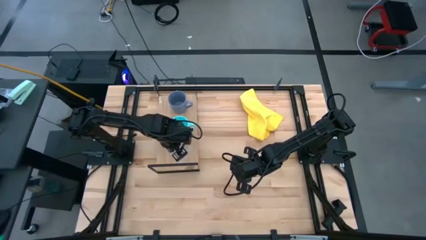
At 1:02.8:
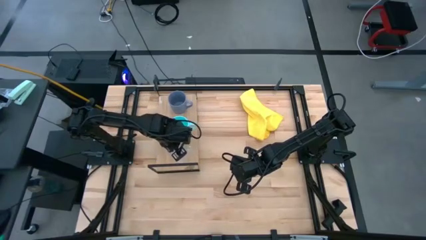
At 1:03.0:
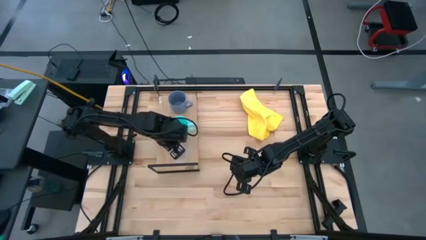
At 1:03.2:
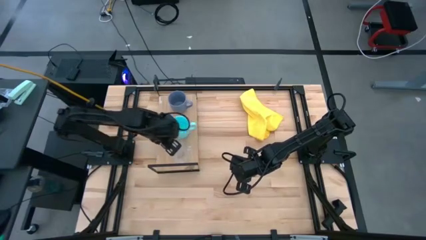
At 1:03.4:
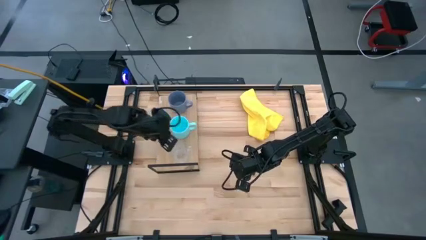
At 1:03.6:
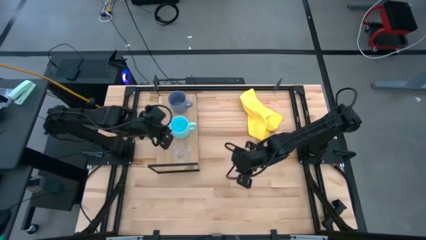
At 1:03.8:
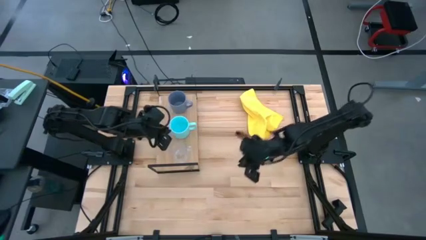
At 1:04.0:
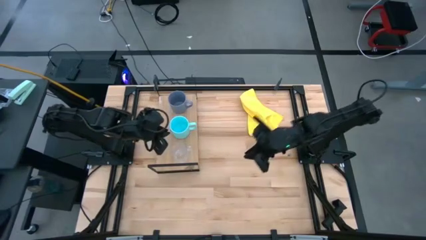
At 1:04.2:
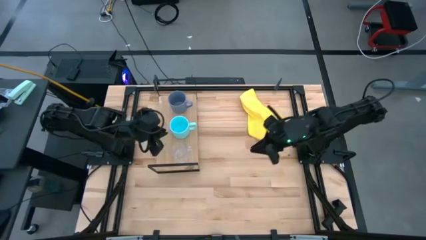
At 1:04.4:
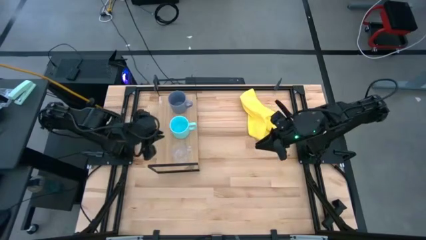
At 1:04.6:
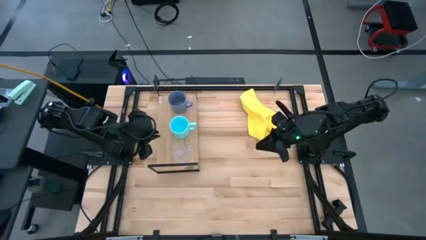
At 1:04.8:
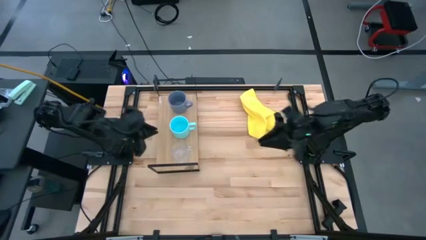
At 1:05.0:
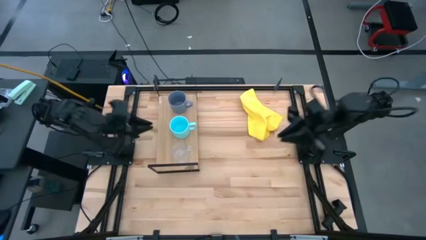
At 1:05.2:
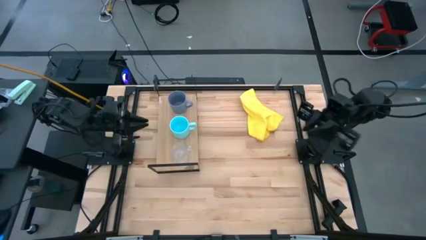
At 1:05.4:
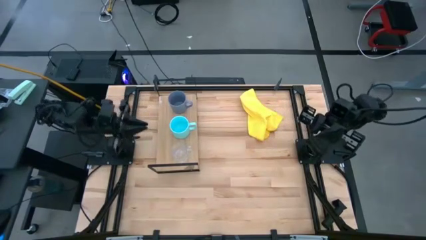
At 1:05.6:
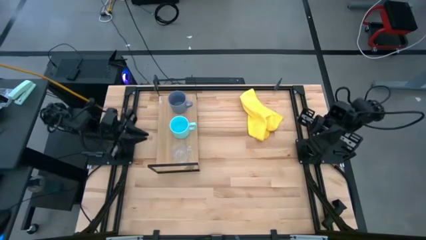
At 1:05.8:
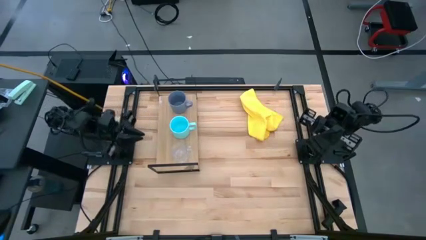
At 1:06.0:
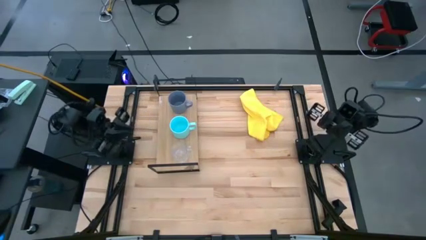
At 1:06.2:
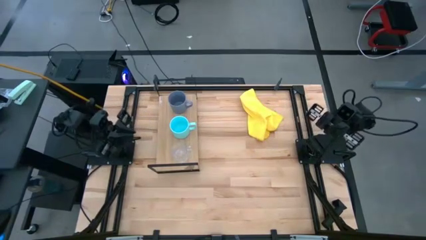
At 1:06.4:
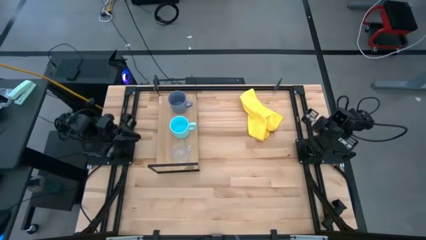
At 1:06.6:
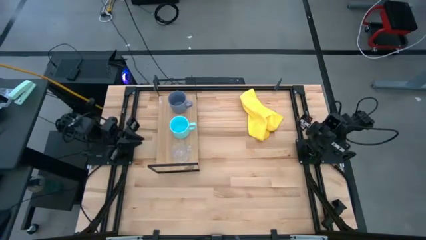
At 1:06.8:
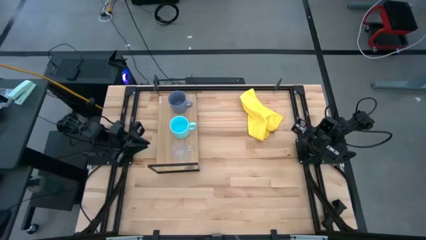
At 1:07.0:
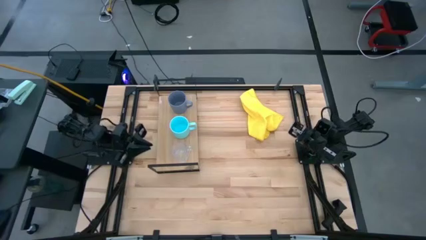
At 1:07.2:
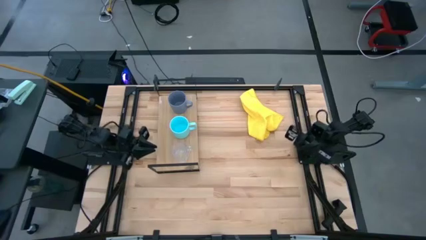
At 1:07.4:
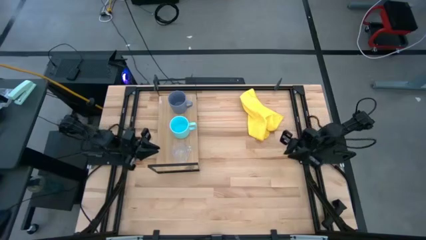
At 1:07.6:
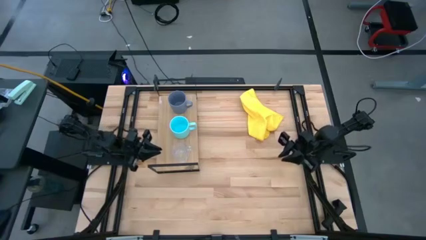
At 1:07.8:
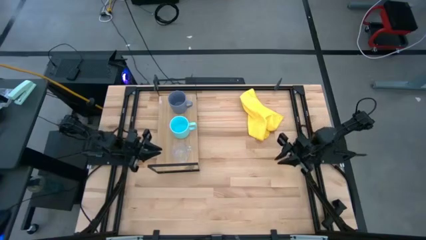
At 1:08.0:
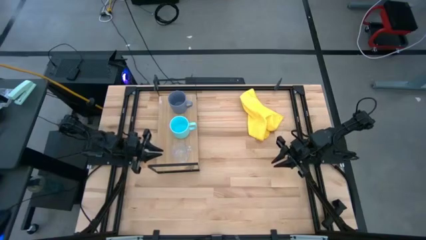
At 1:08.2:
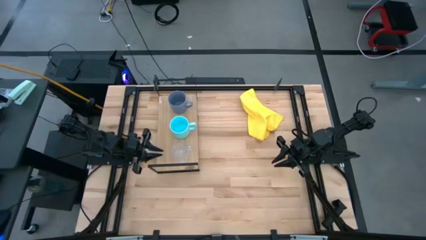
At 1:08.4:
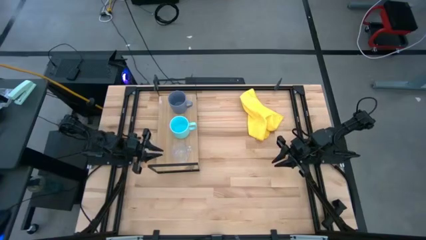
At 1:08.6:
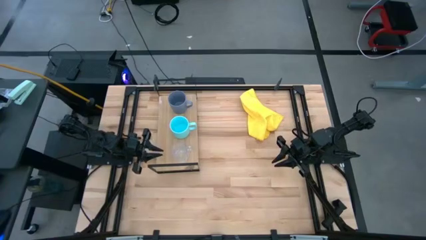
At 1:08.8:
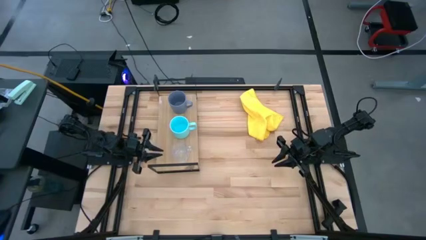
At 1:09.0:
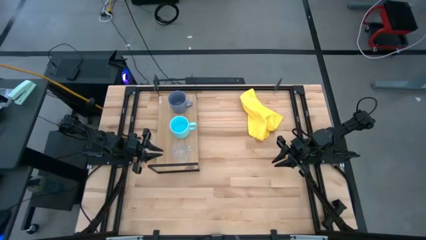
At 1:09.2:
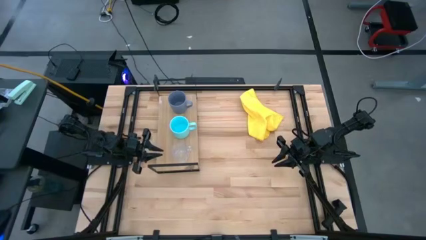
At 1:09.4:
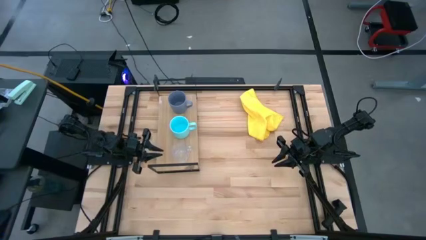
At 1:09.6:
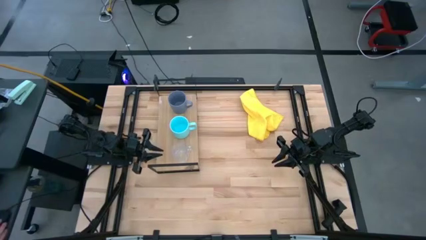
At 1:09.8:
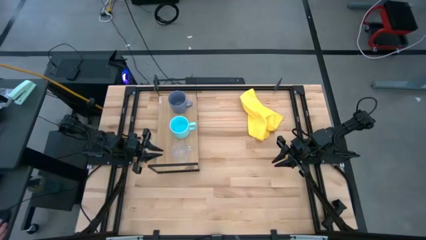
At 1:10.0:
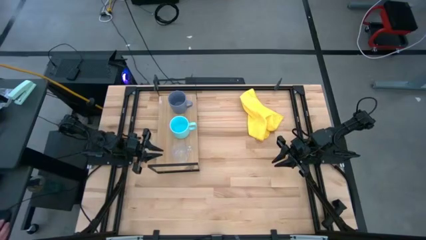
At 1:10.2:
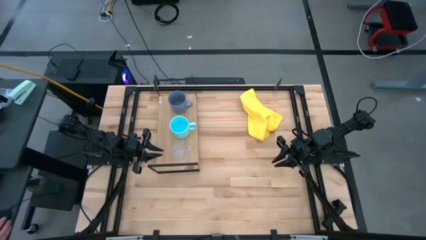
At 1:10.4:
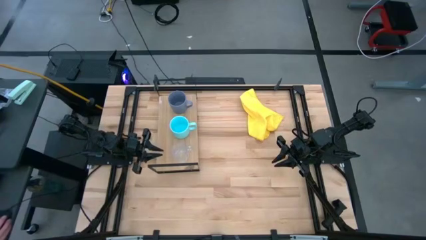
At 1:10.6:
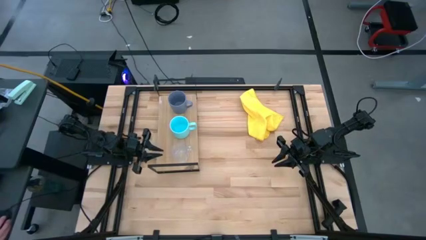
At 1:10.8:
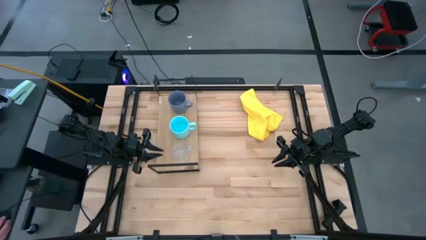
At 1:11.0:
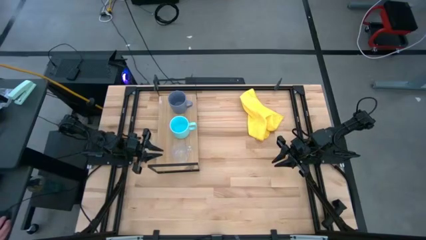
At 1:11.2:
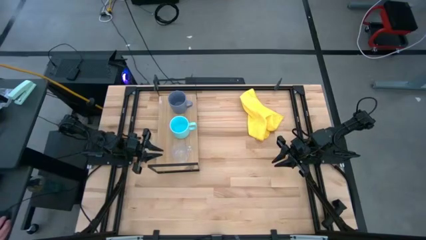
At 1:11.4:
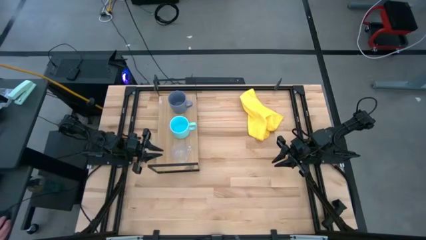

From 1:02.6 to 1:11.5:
Task: Stack small to large cups/mugs on shelf
Return to Home Position
